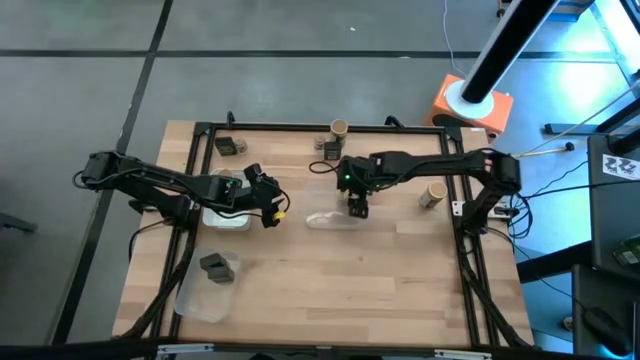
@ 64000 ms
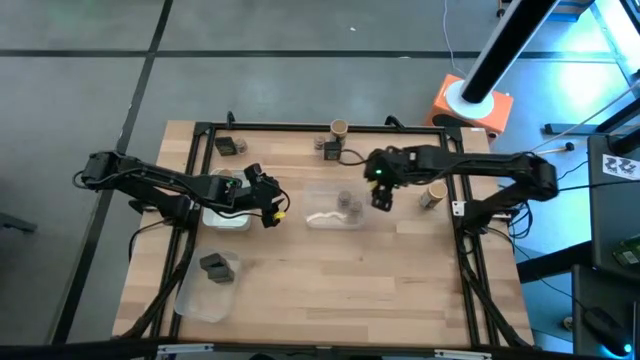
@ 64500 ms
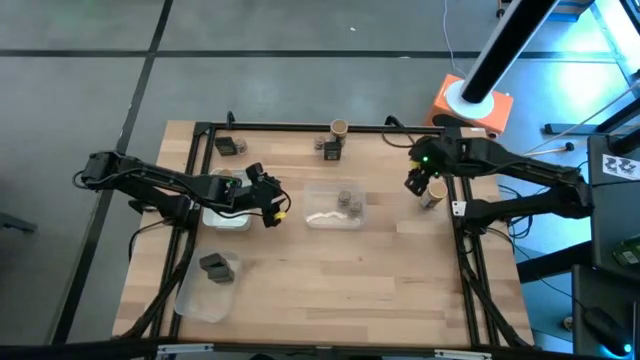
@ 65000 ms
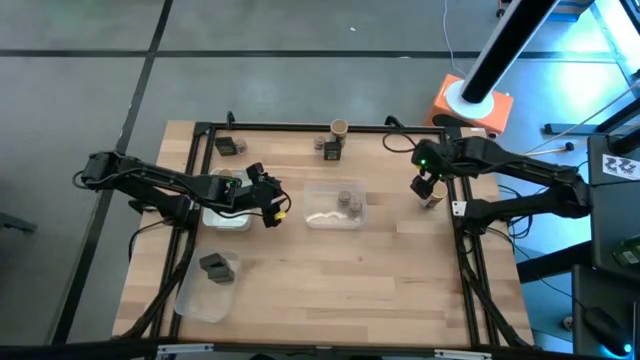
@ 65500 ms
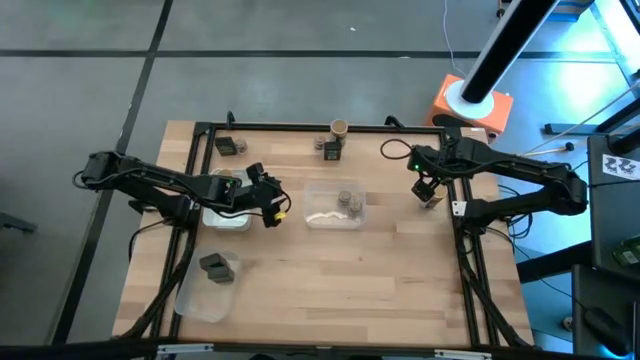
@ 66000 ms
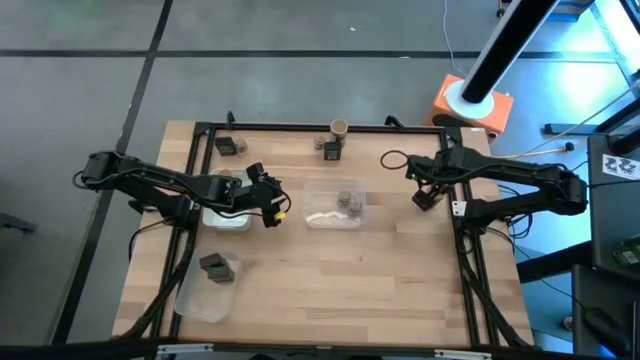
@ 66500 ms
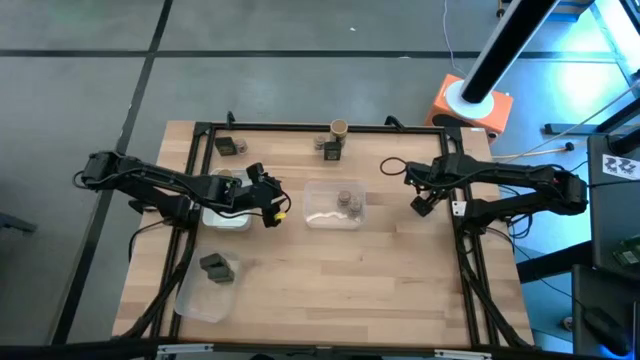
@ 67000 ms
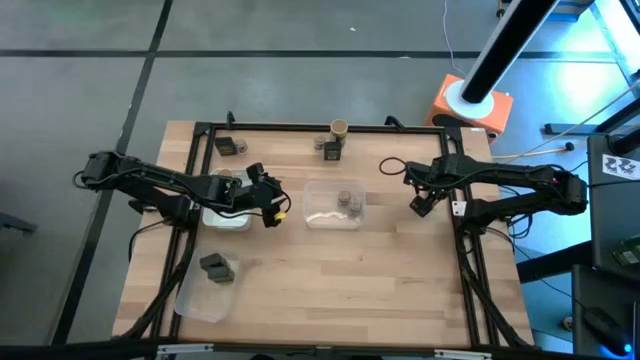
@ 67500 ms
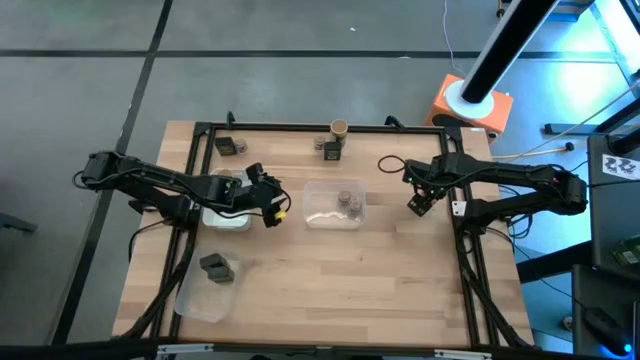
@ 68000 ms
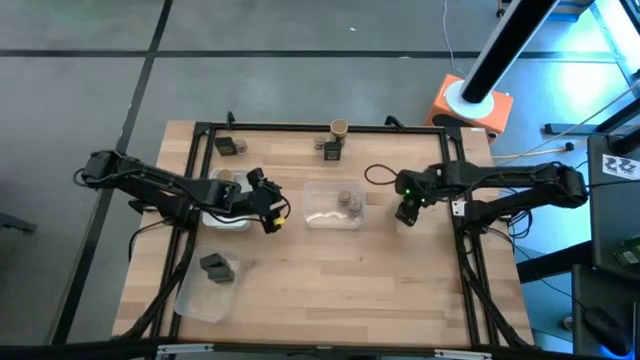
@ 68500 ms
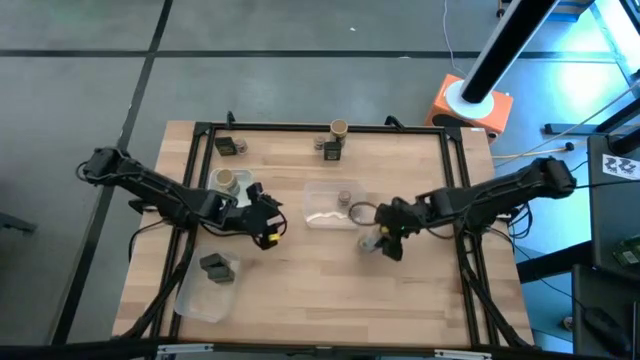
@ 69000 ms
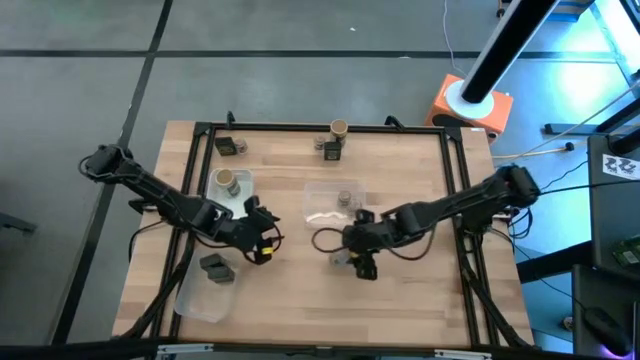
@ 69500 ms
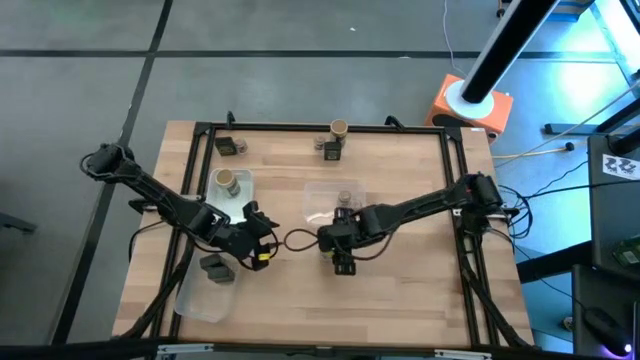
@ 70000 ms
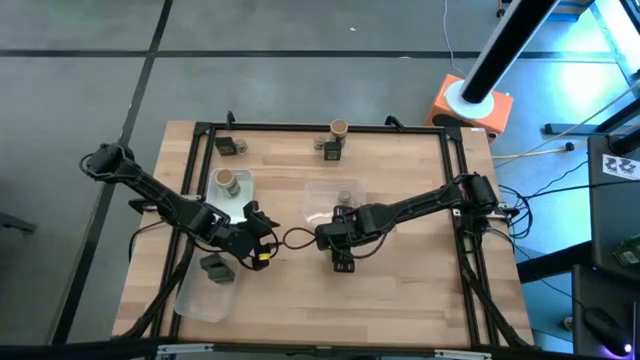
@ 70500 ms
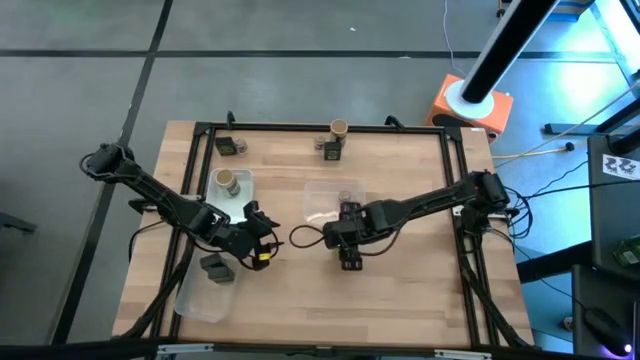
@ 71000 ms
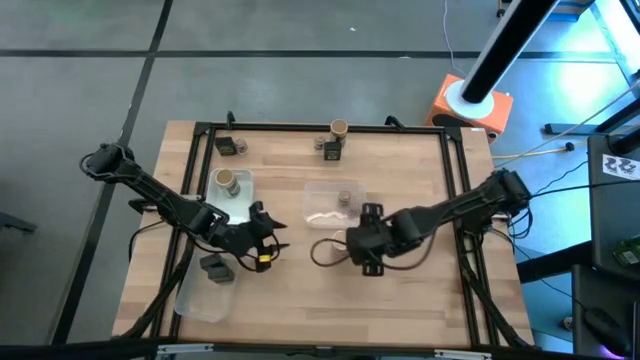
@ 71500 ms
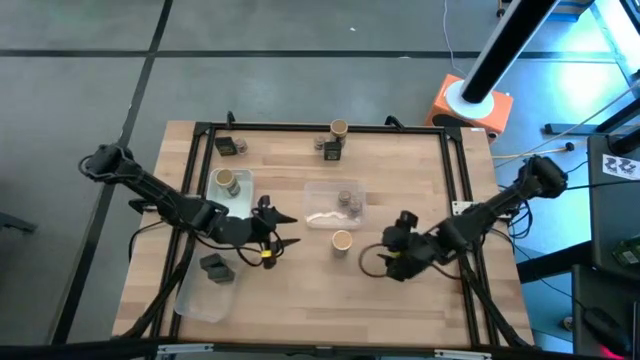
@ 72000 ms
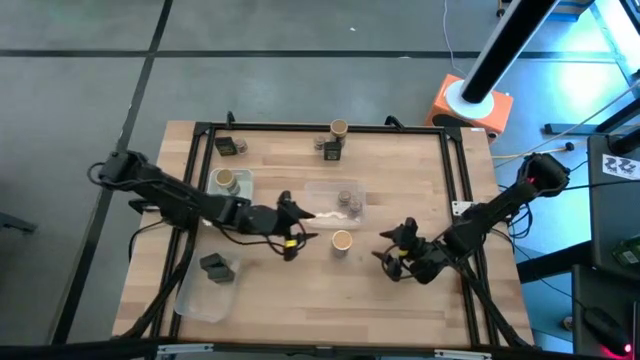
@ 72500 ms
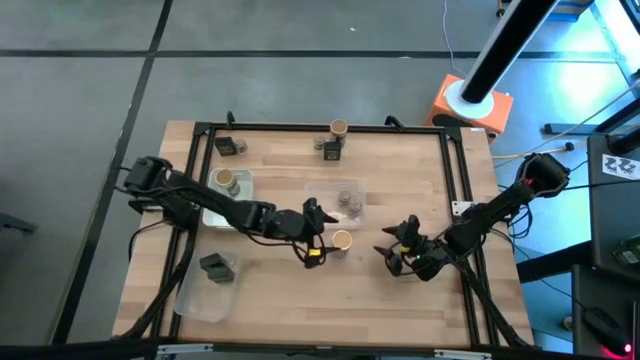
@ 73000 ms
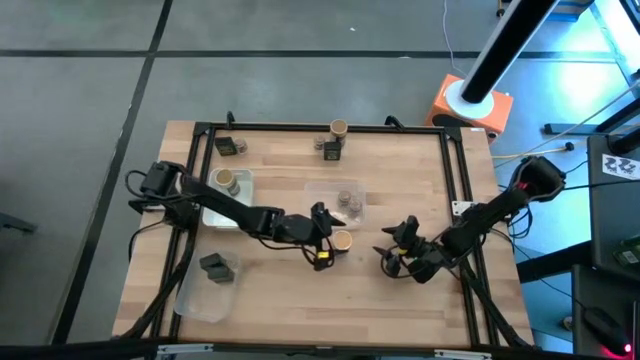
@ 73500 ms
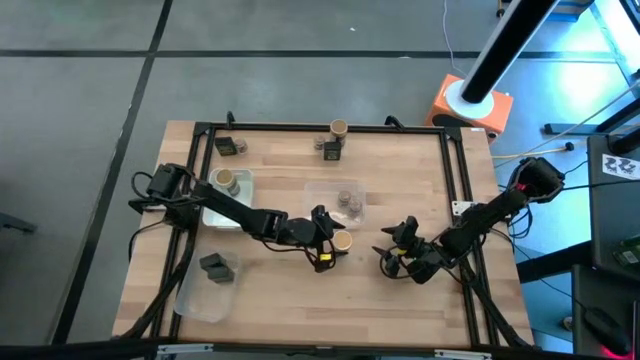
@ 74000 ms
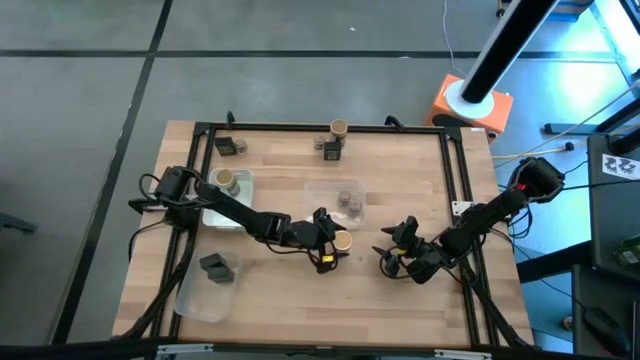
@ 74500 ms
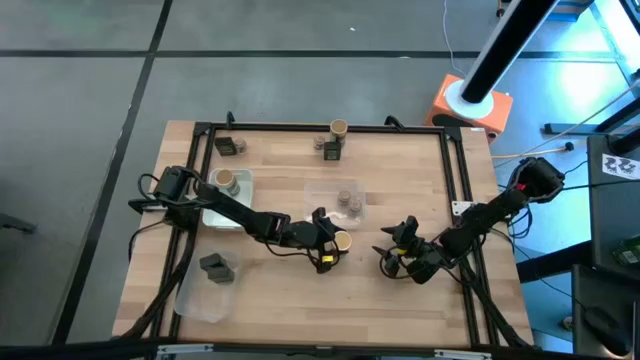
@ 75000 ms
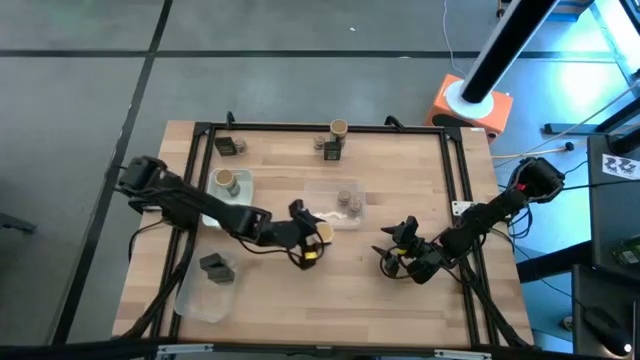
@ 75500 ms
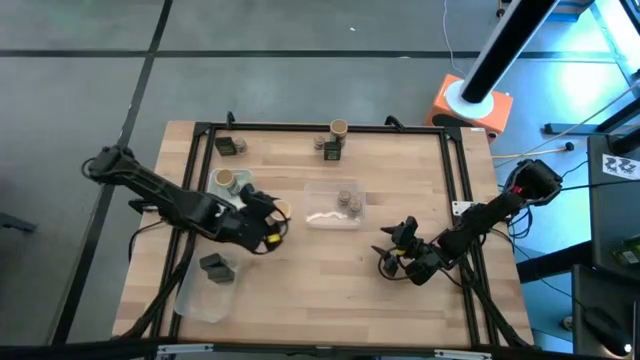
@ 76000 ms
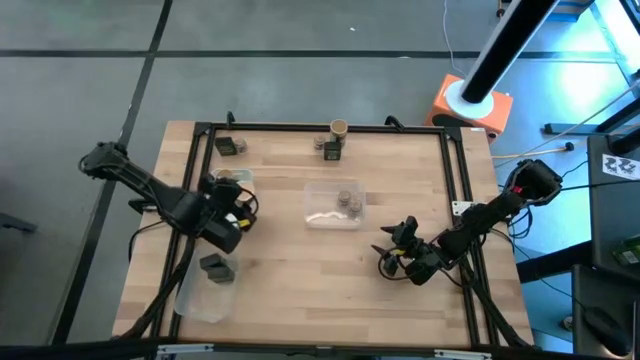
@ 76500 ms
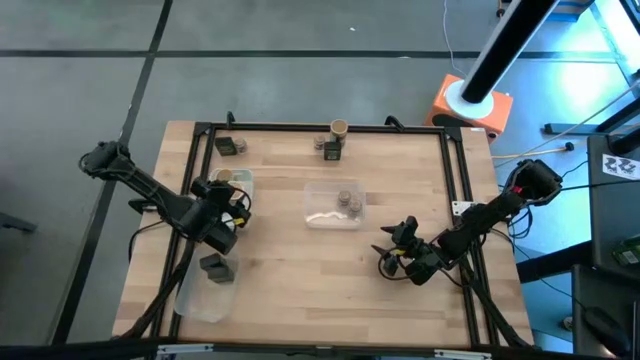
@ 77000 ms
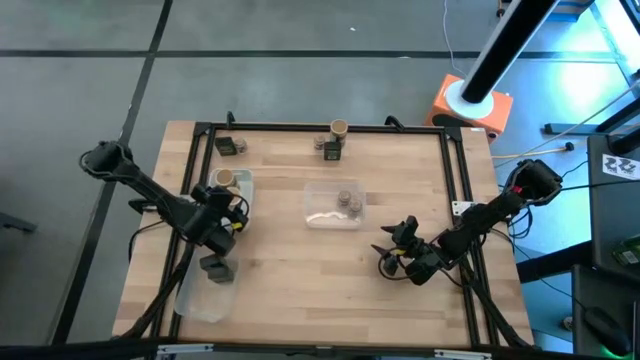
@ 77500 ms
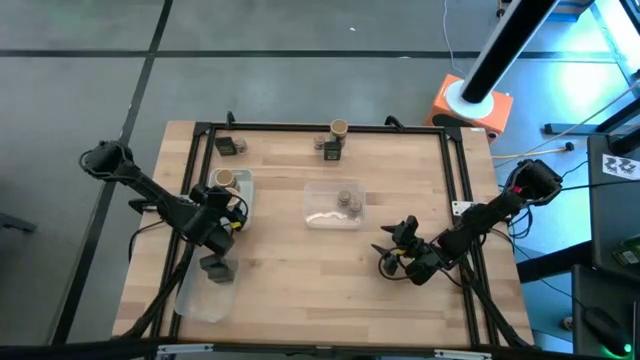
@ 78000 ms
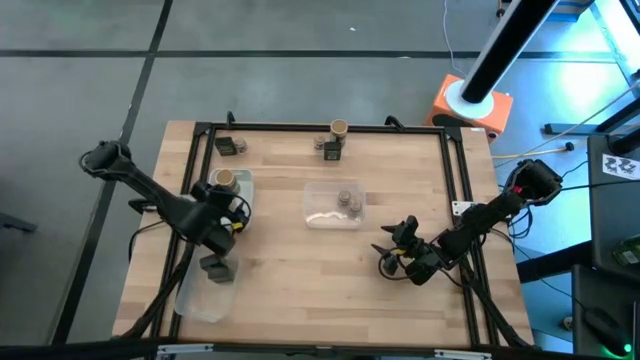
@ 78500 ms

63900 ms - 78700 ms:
Task: Sort spices by type
Put the gold seasoning bottle into the white bin

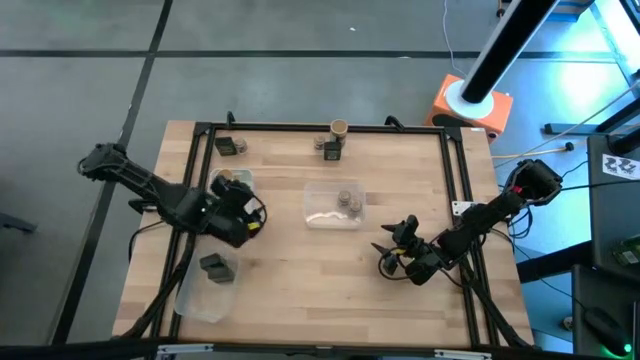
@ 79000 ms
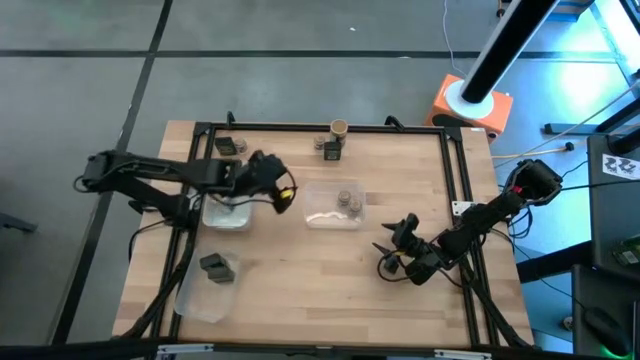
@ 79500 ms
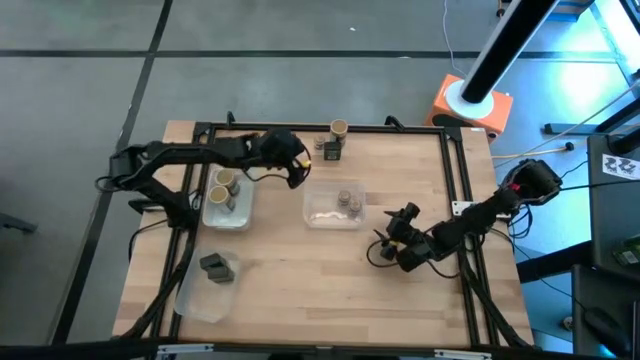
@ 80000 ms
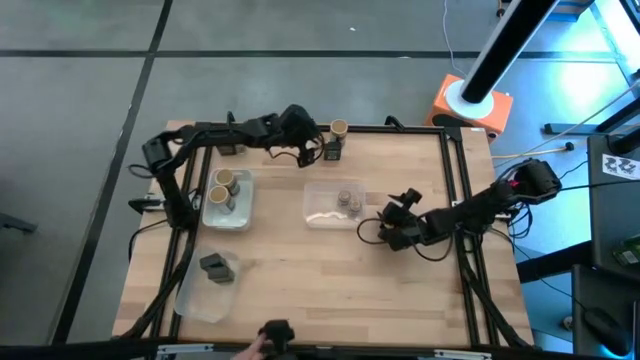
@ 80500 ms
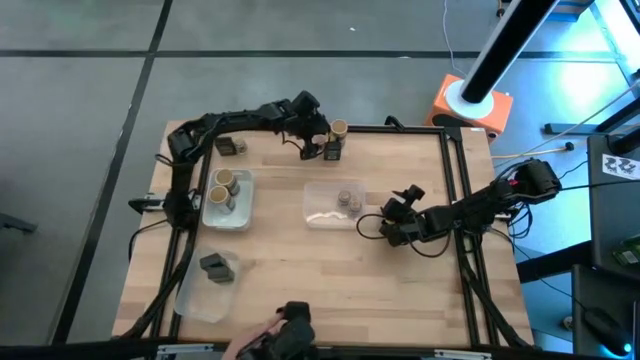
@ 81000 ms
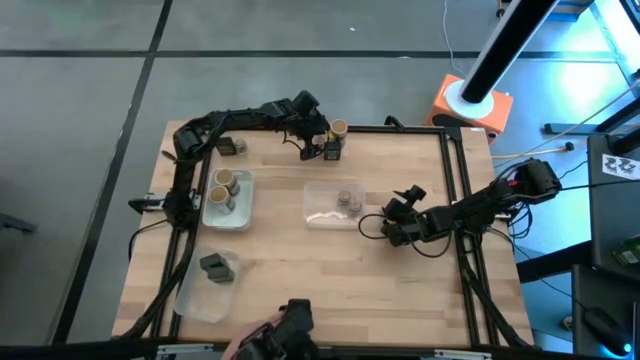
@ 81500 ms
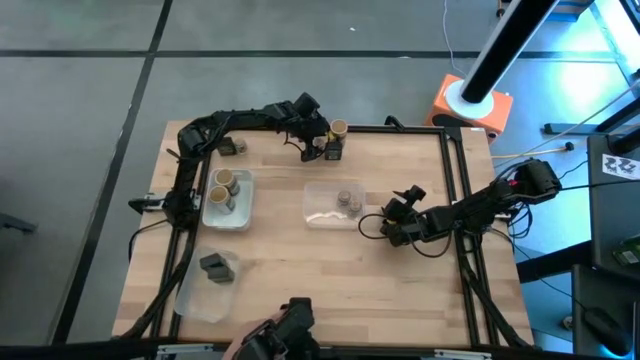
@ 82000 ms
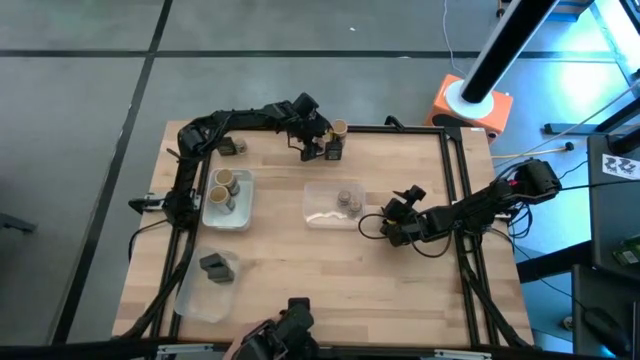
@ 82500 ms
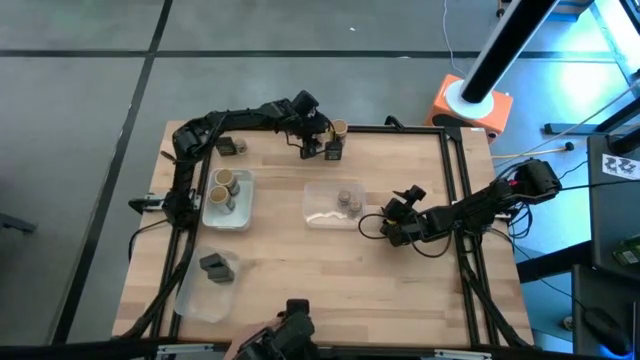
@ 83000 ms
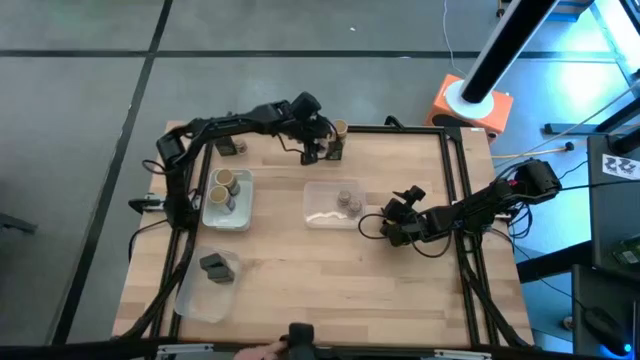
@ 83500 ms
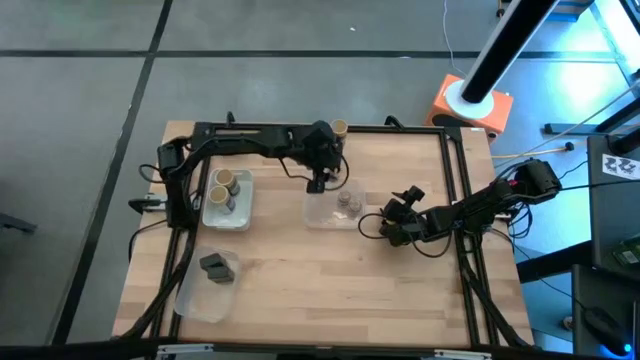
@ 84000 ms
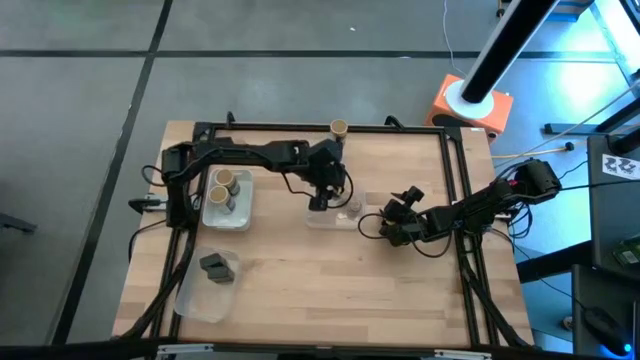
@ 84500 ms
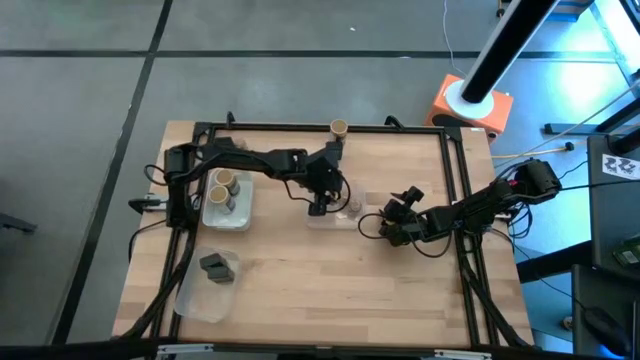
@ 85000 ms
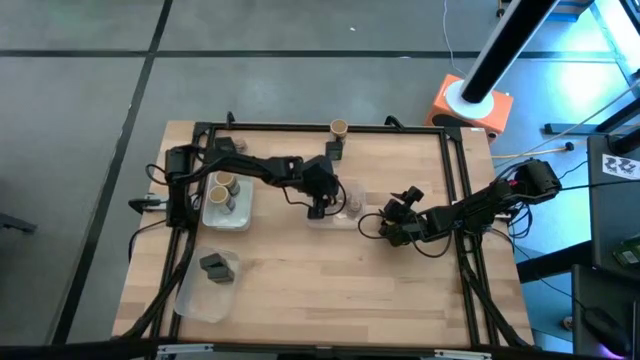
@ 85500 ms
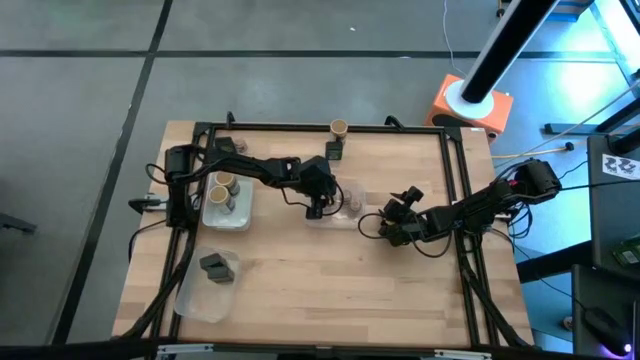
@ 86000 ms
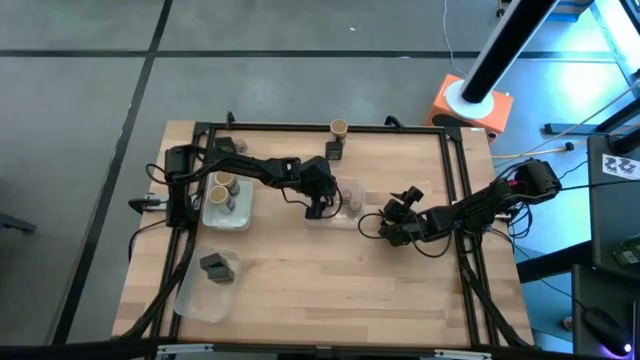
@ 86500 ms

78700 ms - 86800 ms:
Put the brown seasoning bottle into the top transparent bin
